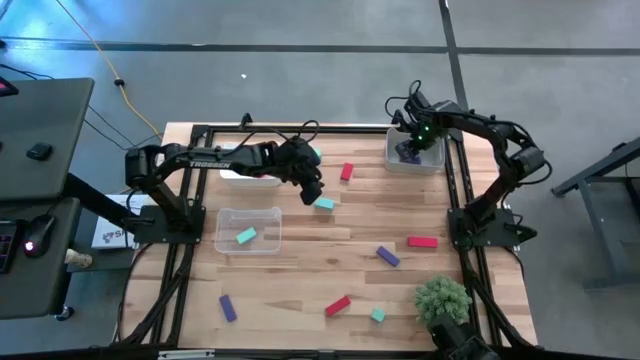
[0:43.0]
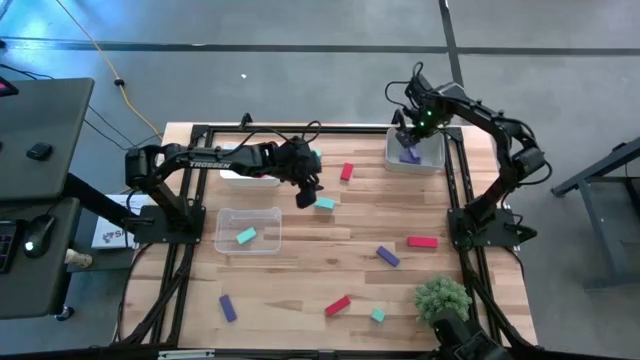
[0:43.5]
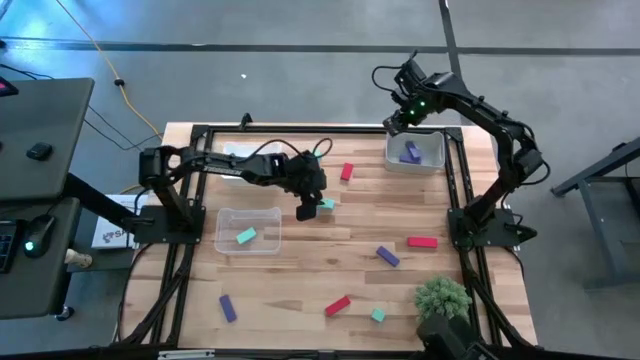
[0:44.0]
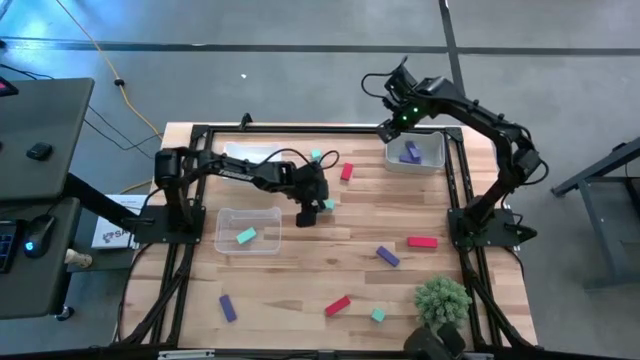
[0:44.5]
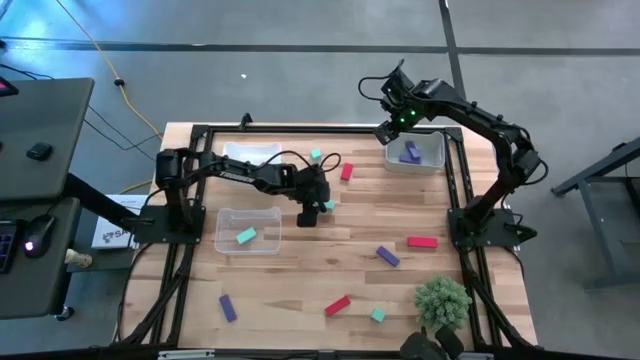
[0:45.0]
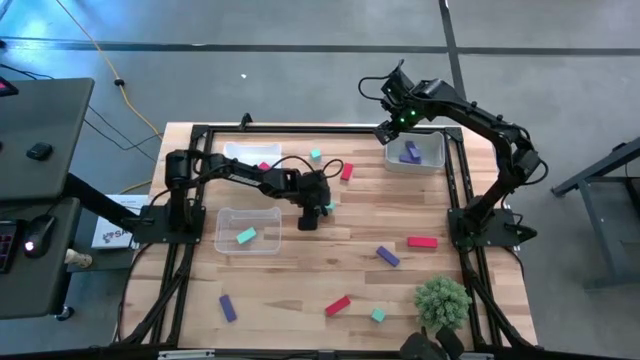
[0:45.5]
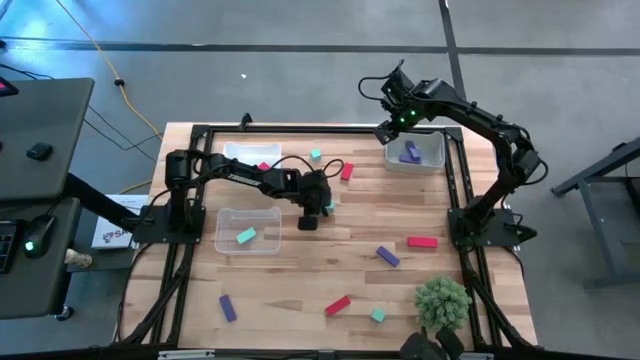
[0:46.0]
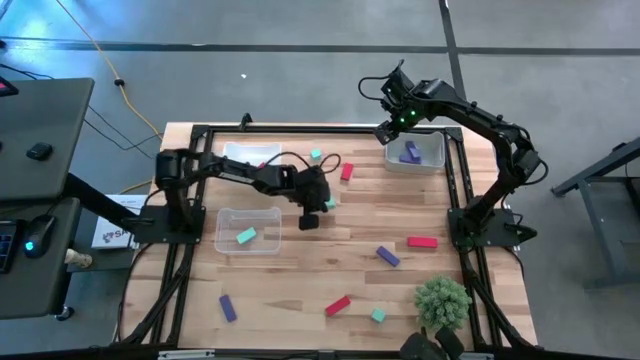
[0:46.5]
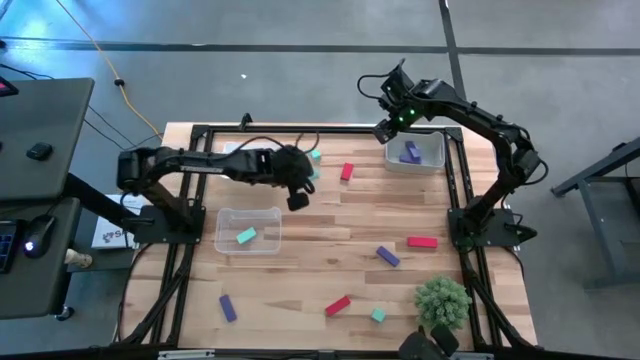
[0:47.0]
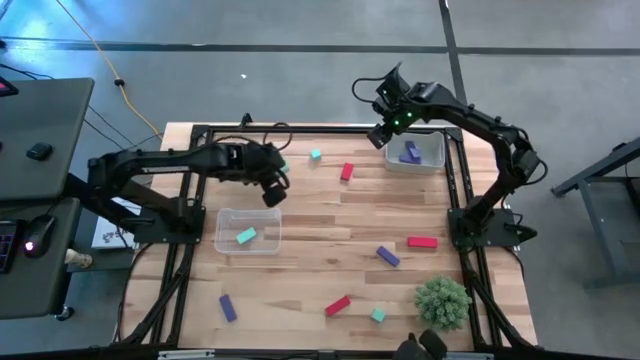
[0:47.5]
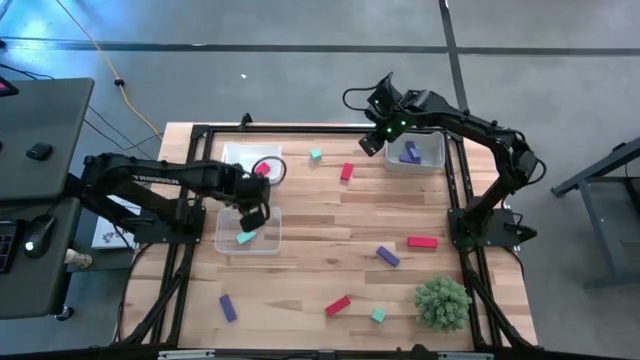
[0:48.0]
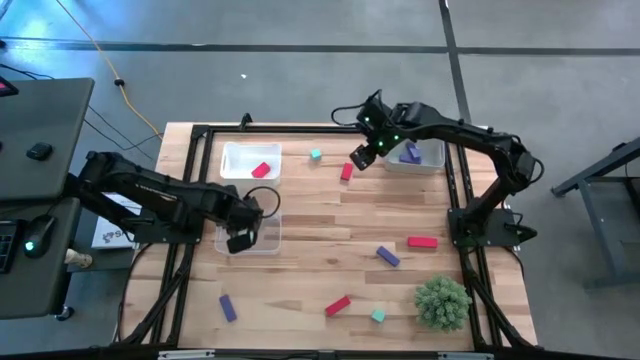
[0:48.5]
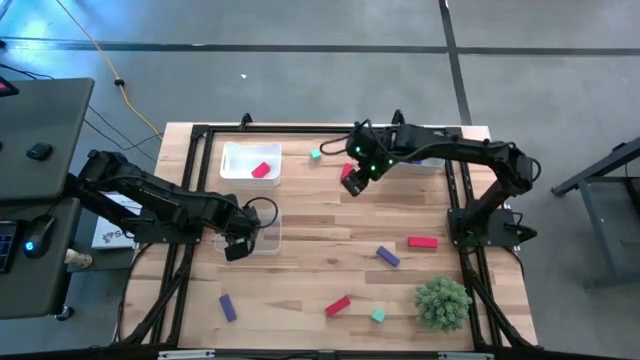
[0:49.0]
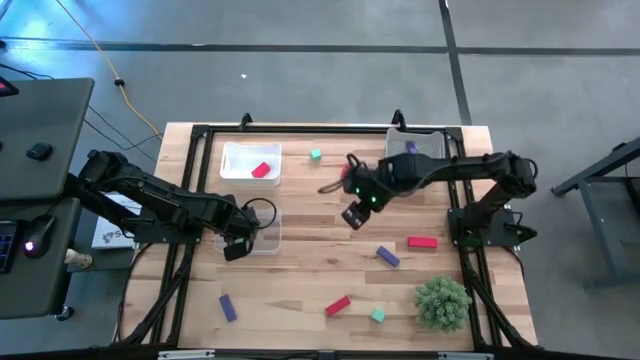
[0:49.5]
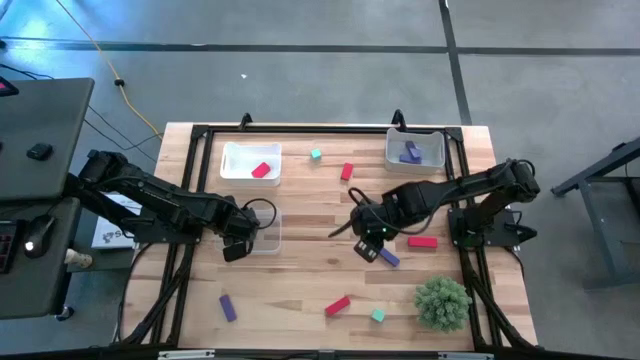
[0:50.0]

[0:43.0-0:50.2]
Task: Sort & place blocks by color
Put the light blue block into the transparent bin

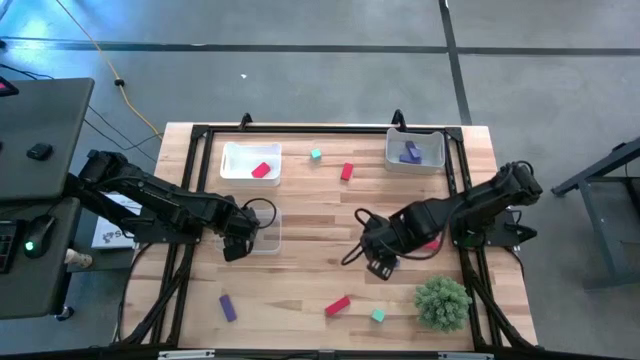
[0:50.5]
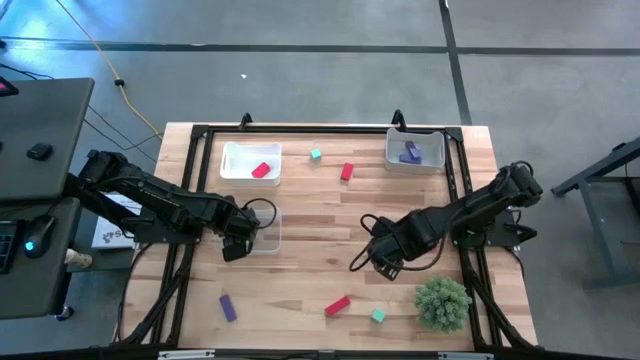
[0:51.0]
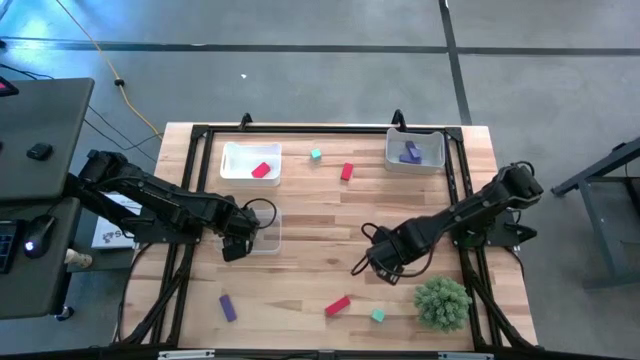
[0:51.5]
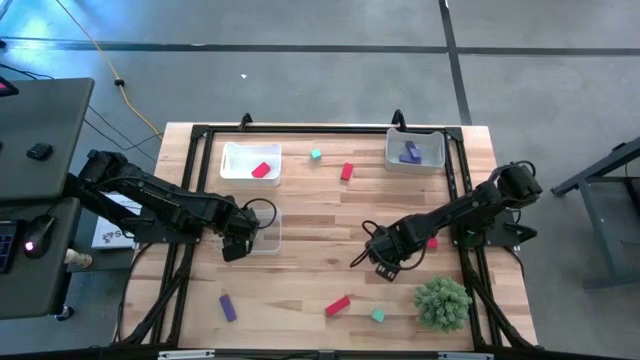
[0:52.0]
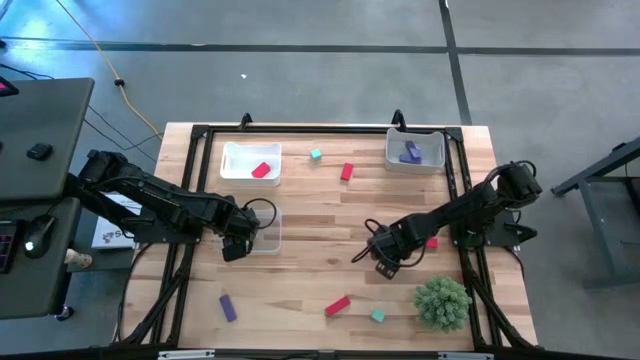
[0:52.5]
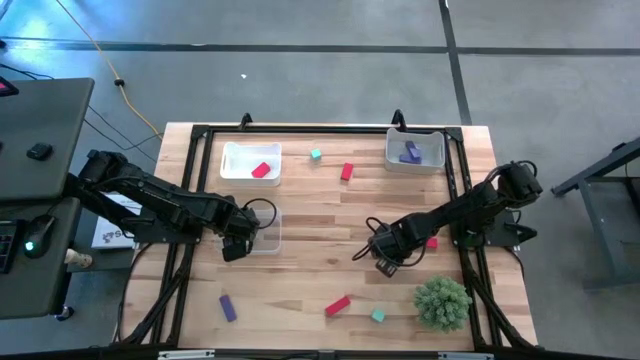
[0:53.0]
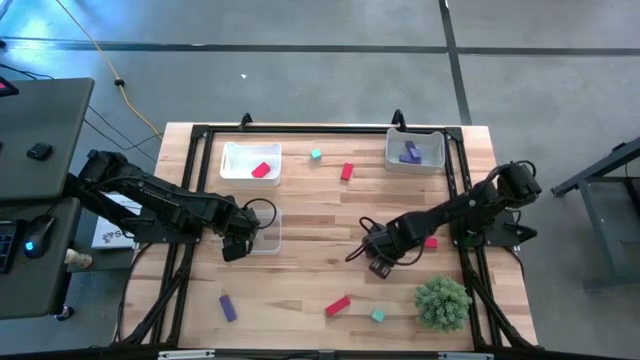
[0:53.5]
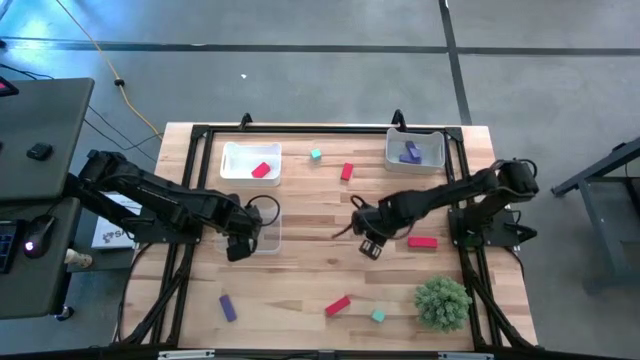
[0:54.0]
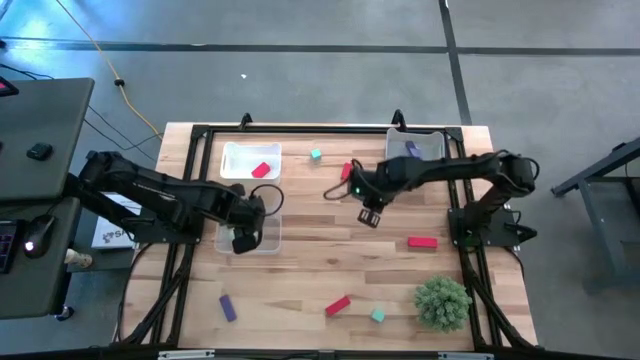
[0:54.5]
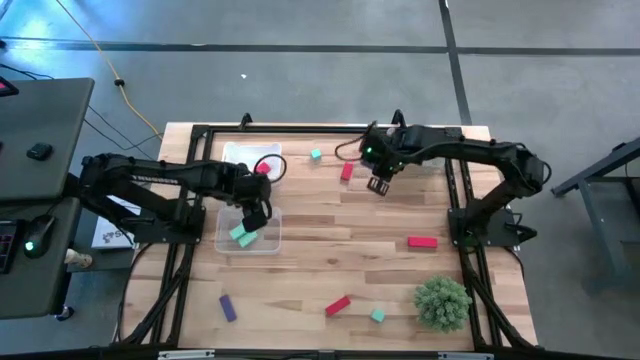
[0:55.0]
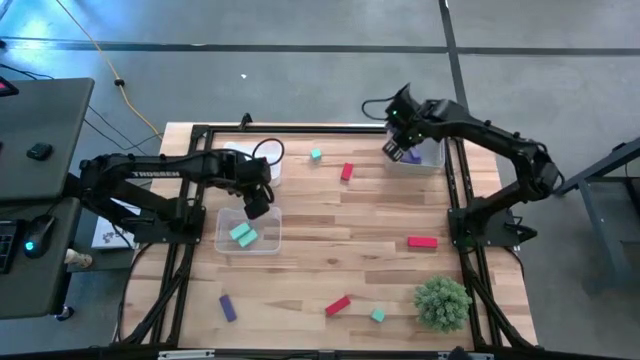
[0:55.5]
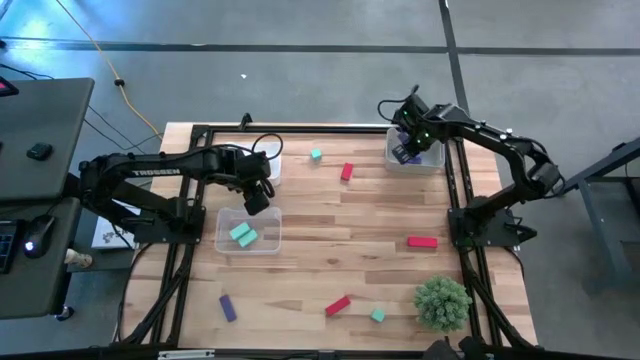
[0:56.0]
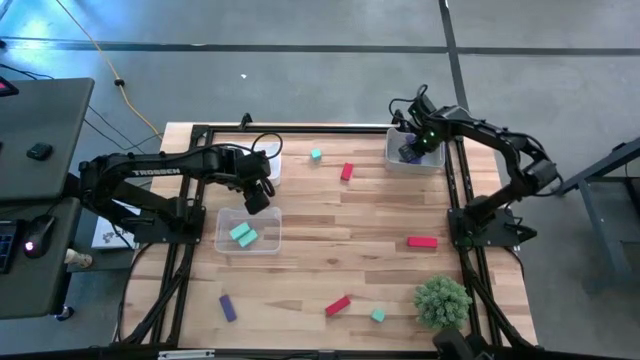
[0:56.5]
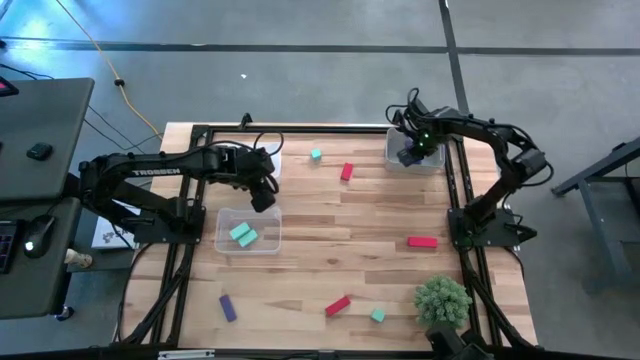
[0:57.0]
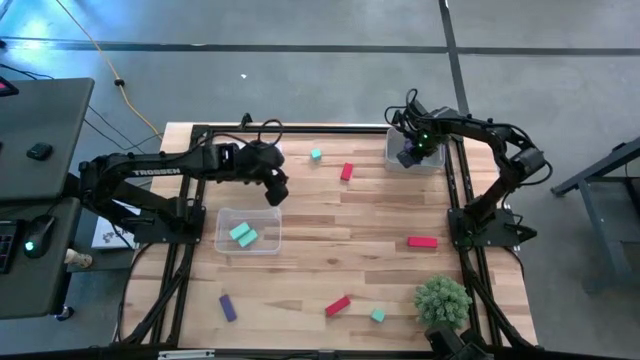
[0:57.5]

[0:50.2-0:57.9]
Put the violet block into the gray bin

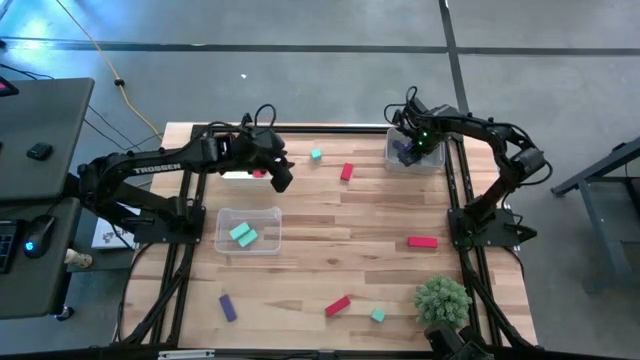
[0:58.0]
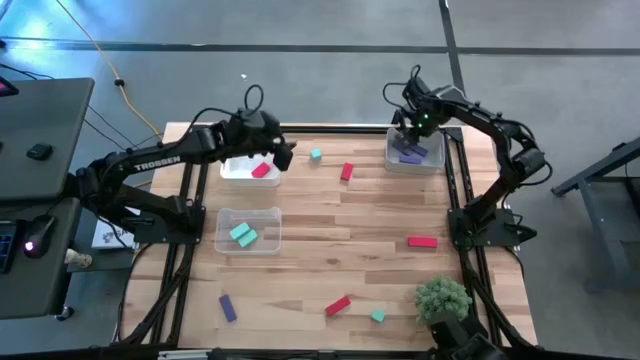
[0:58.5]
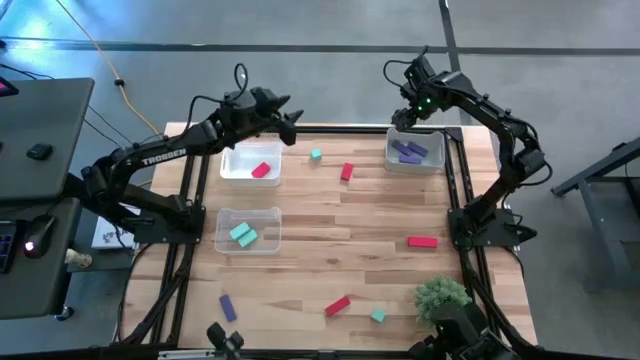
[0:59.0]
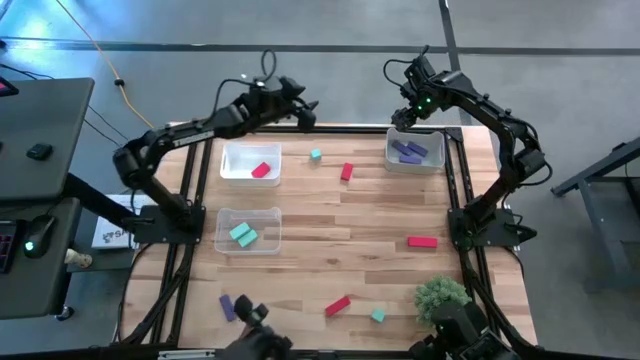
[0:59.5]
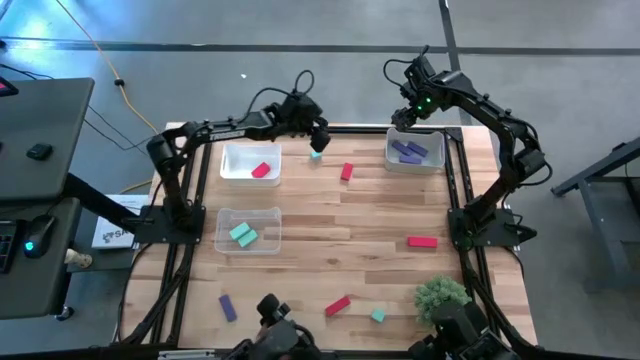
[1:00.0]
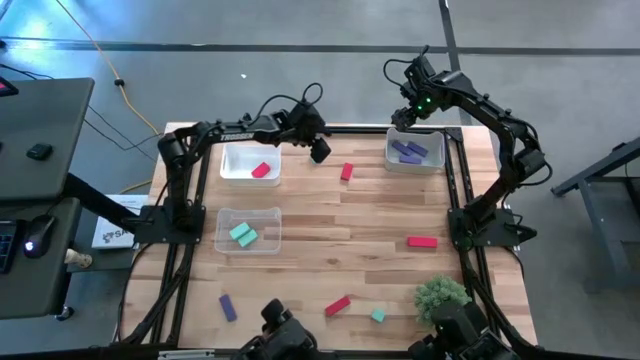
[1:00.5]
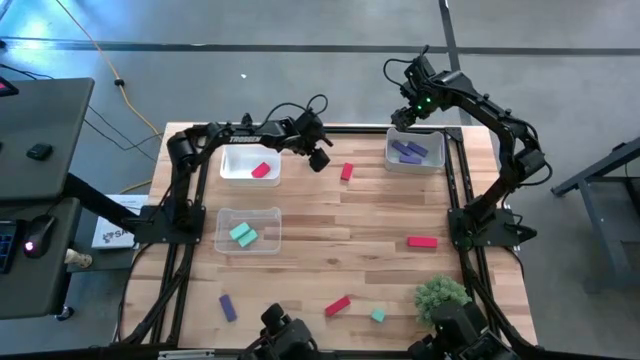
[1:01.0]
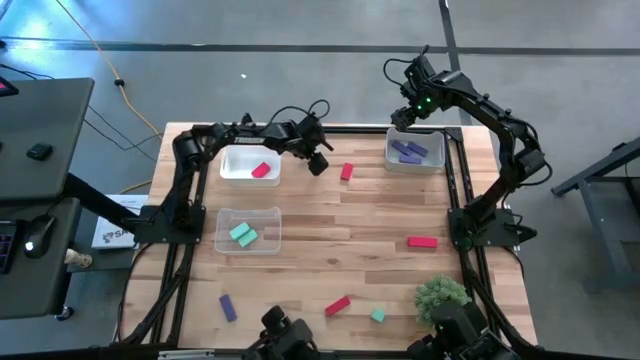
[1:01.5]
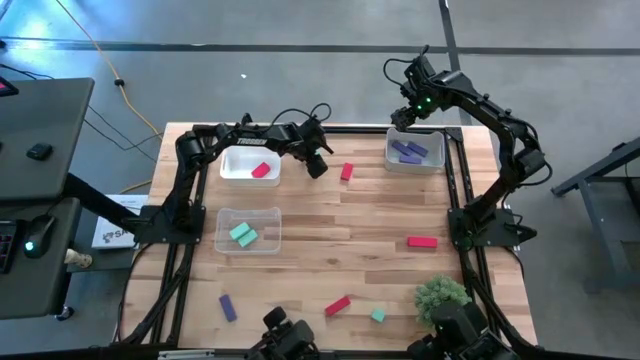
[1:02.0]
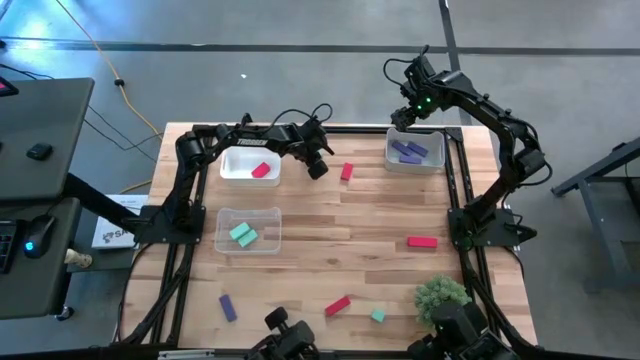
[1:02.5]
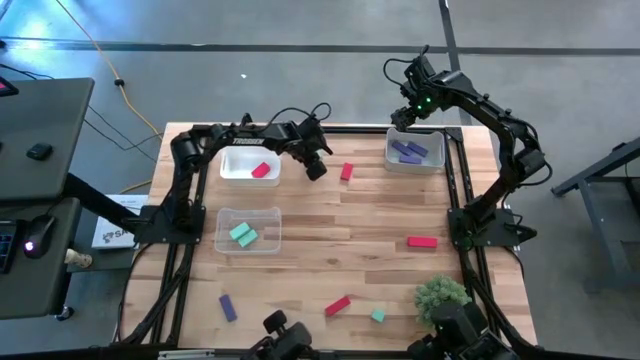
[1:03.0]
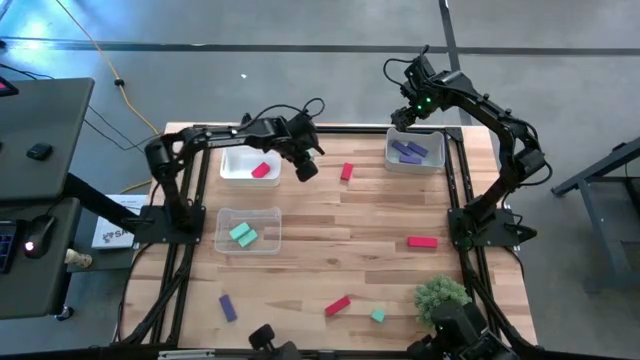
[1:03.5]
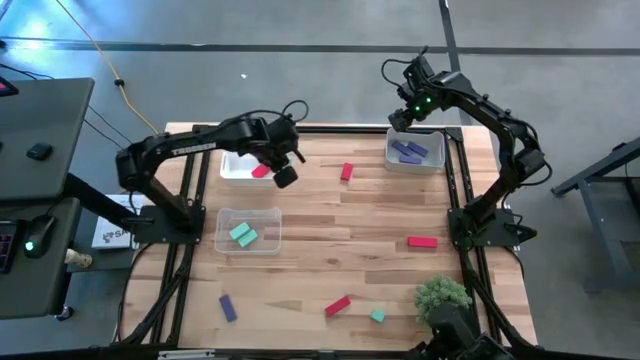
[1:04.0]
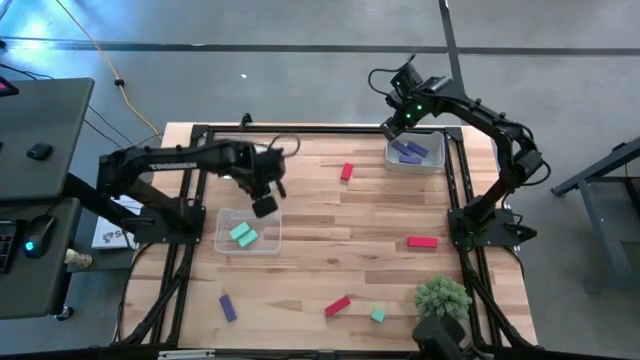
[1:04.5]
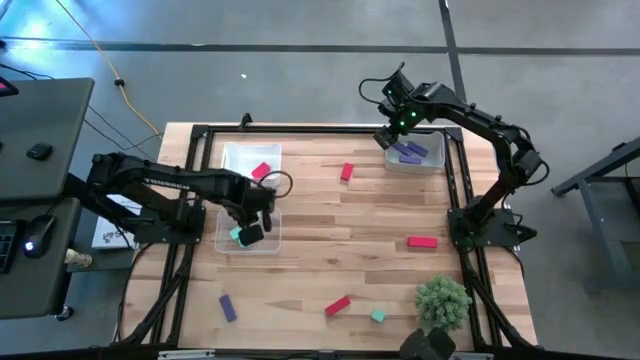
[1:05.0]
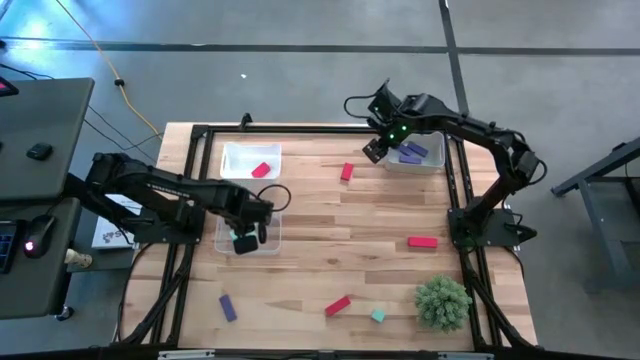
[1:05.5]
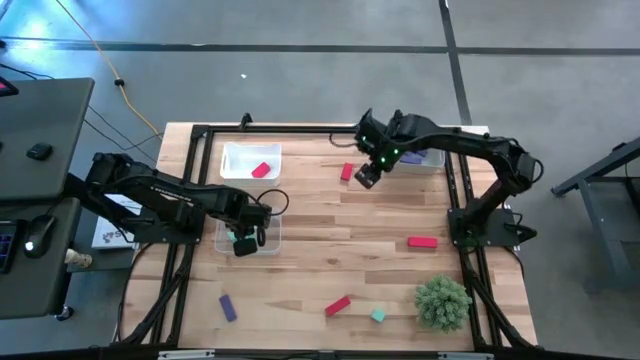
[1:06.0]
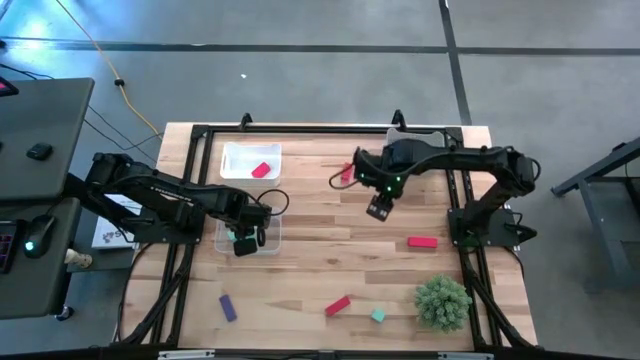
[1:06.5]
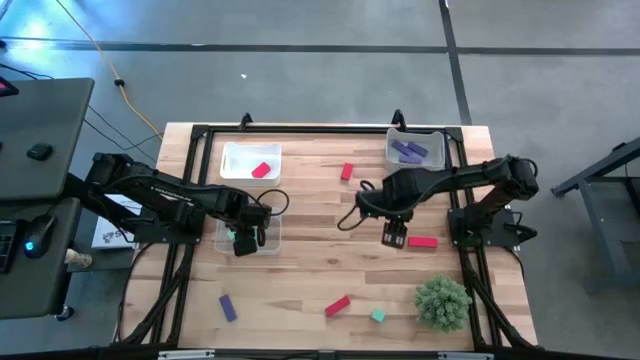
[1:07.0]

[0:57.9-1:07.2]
Put the blue block into the transparent bin
